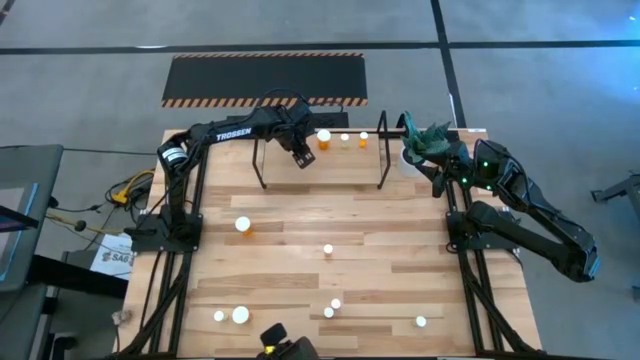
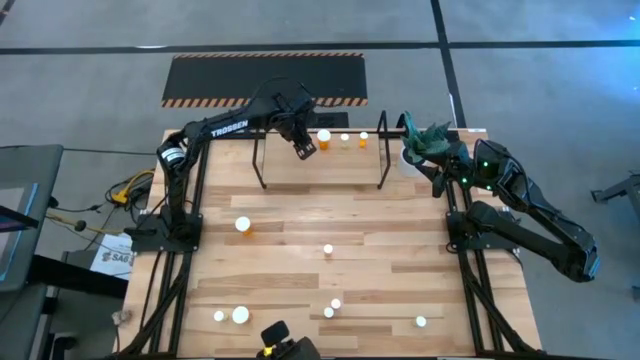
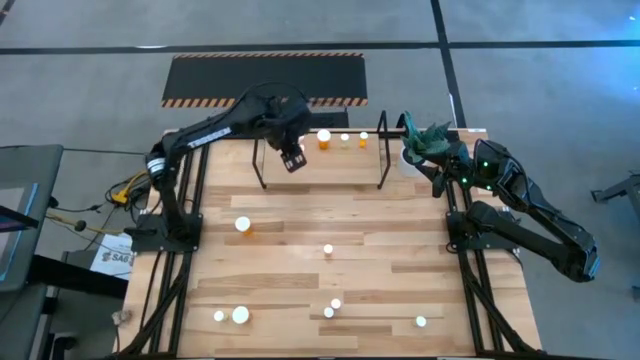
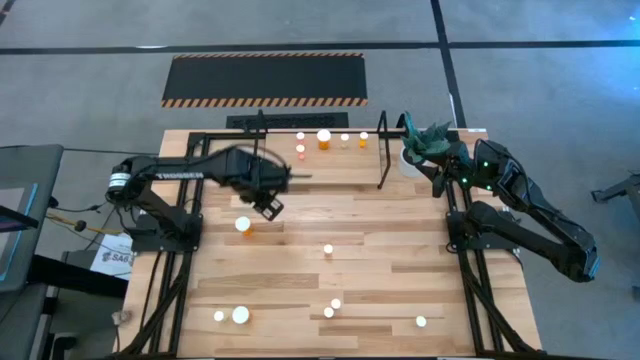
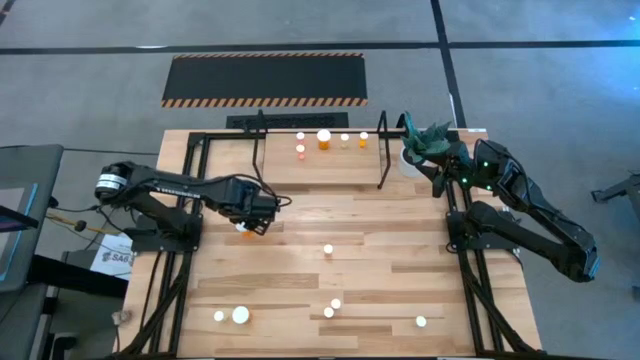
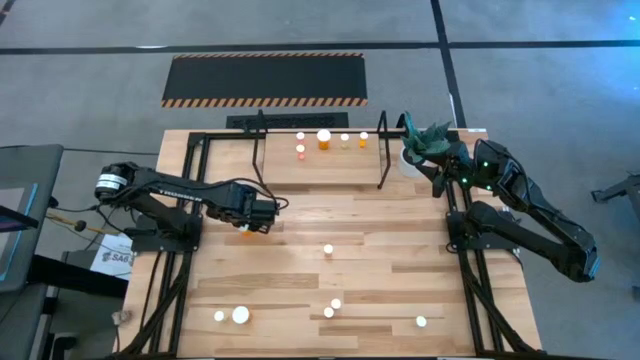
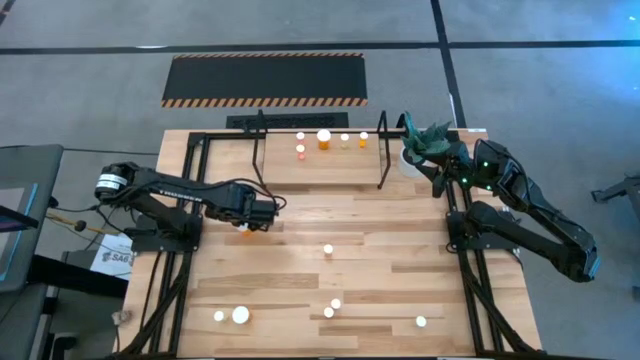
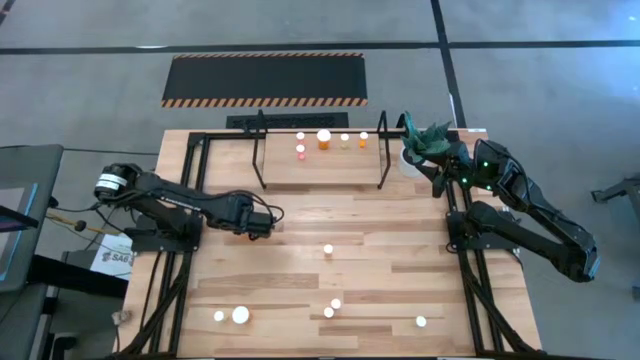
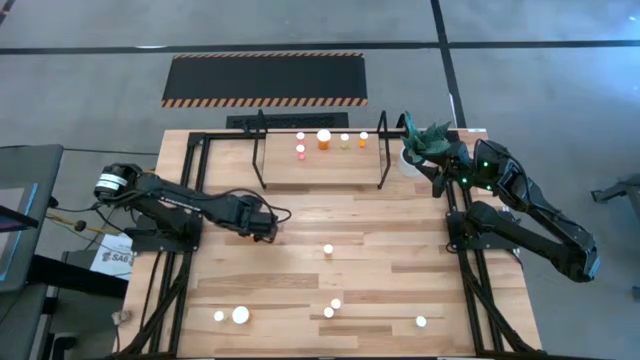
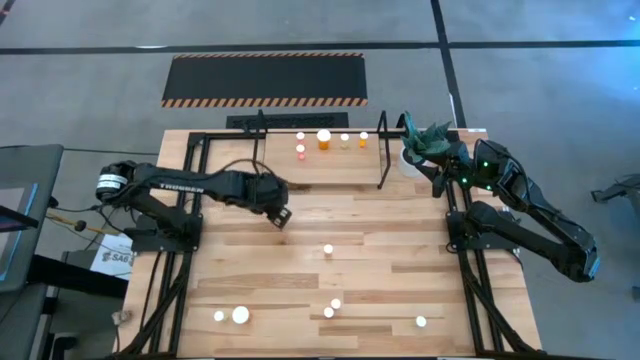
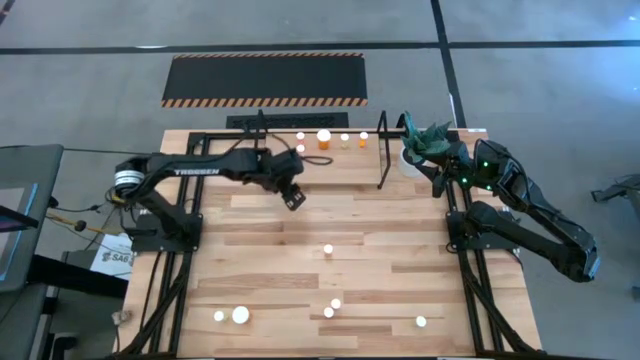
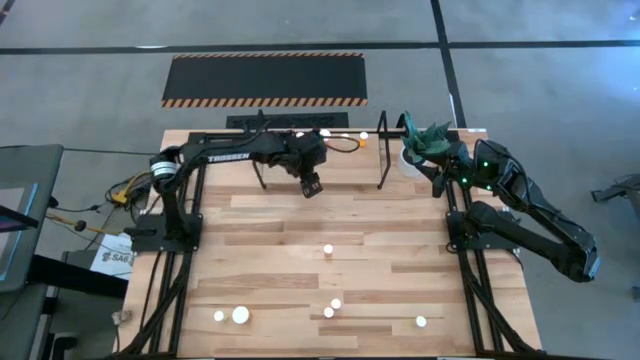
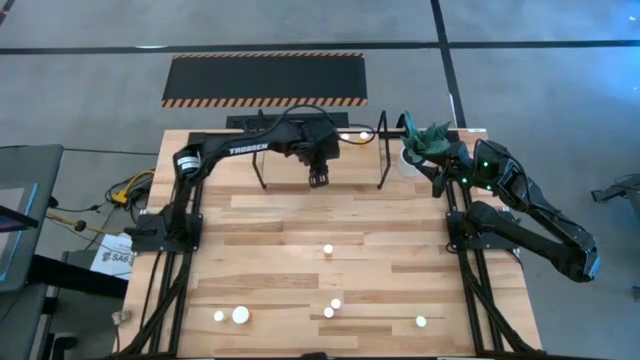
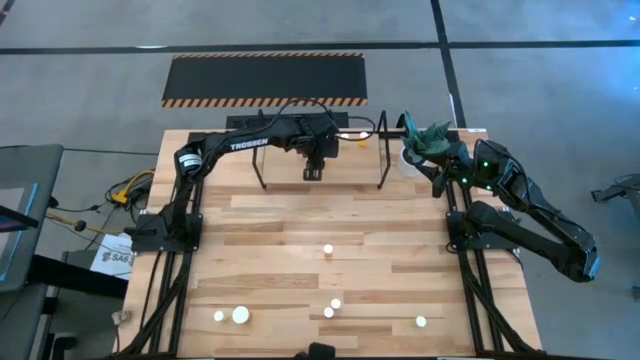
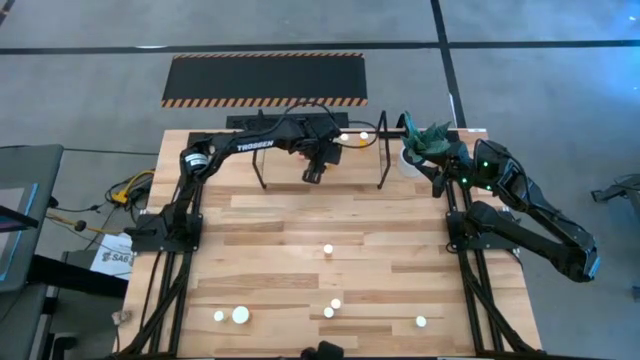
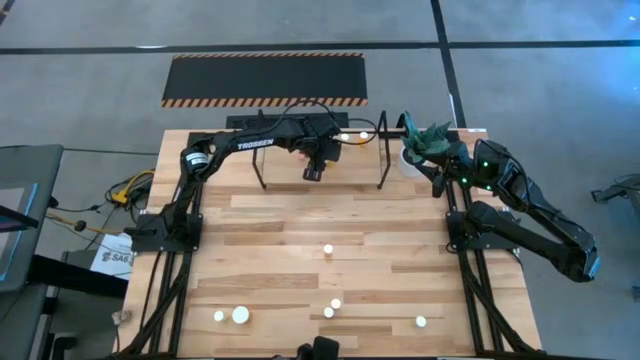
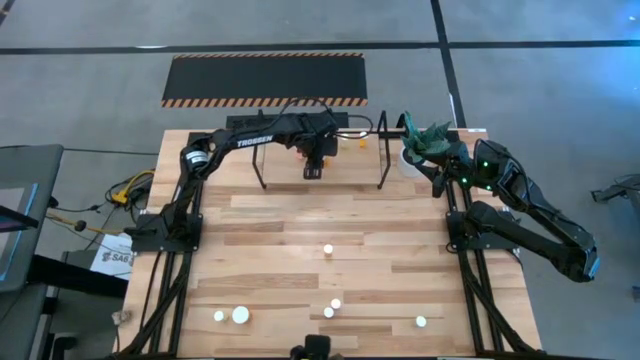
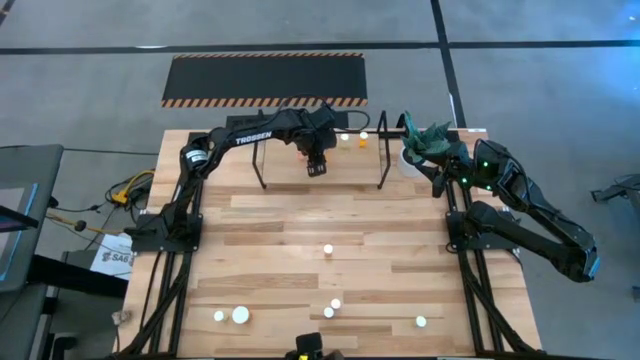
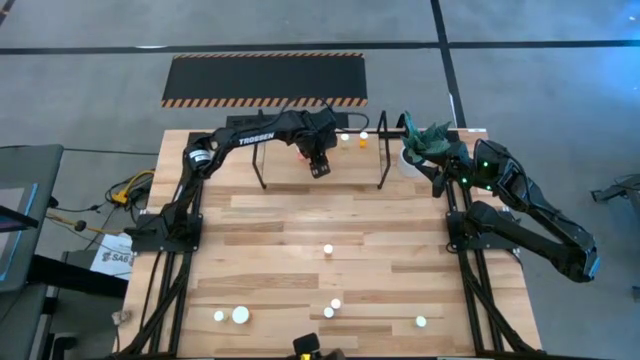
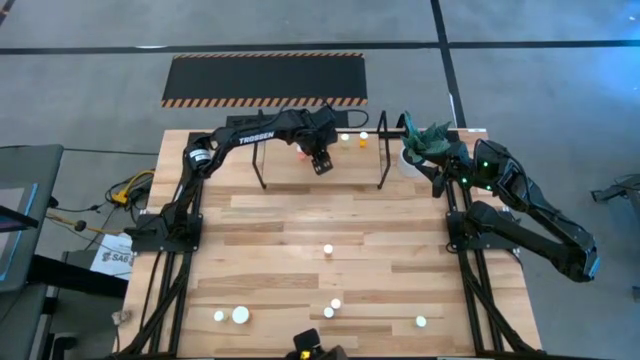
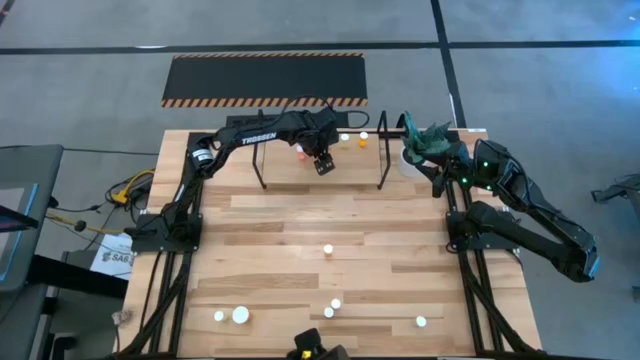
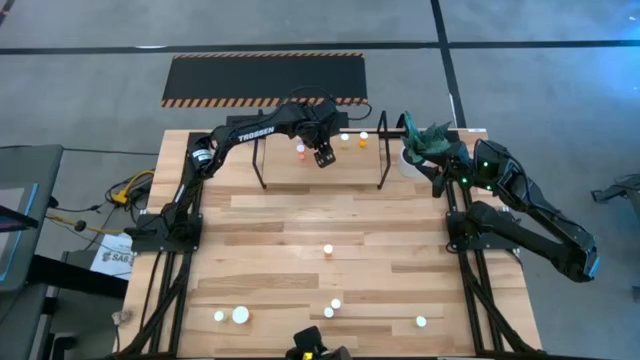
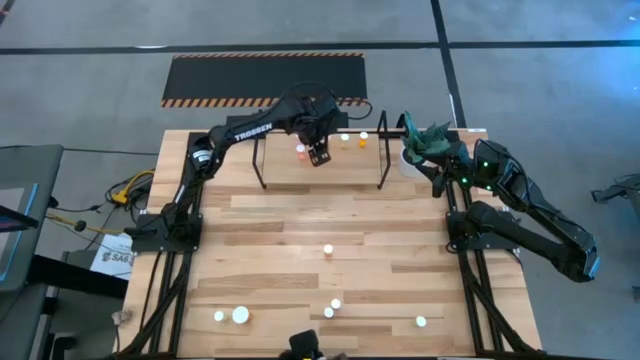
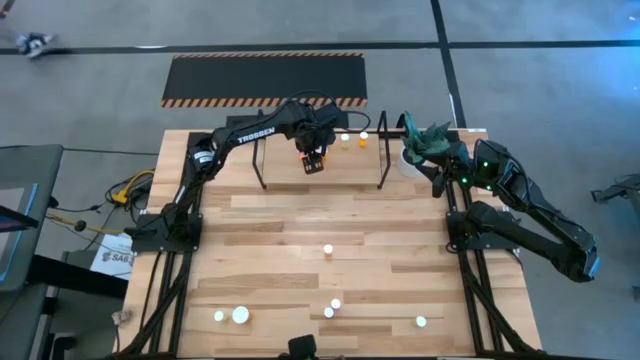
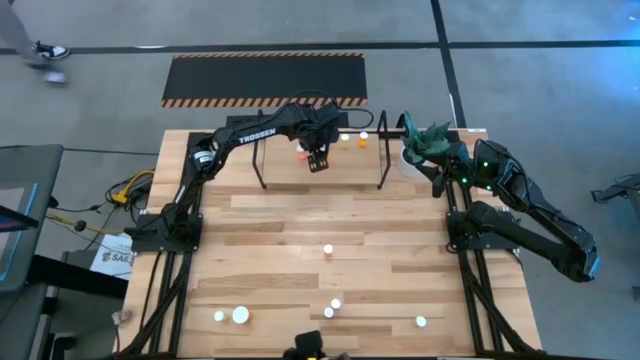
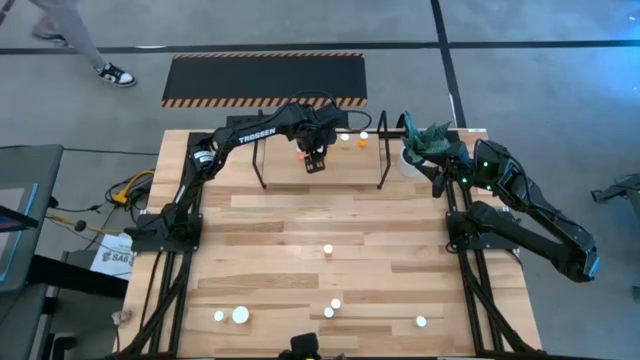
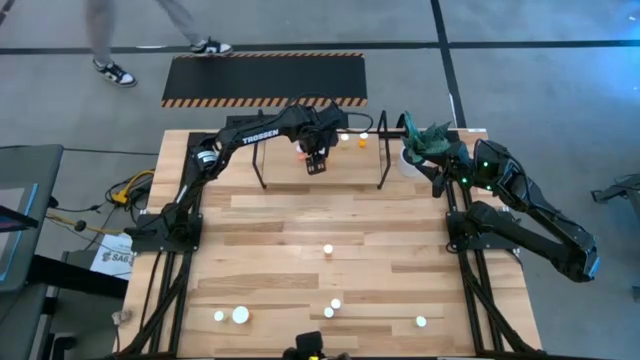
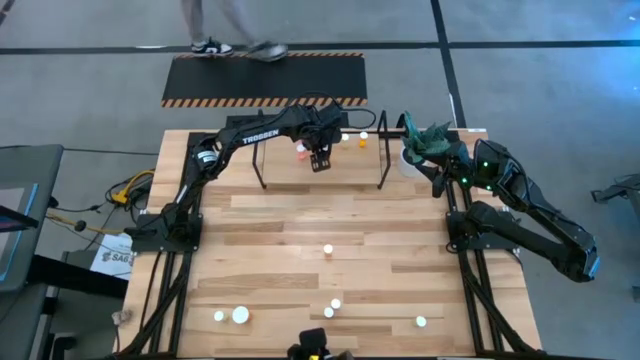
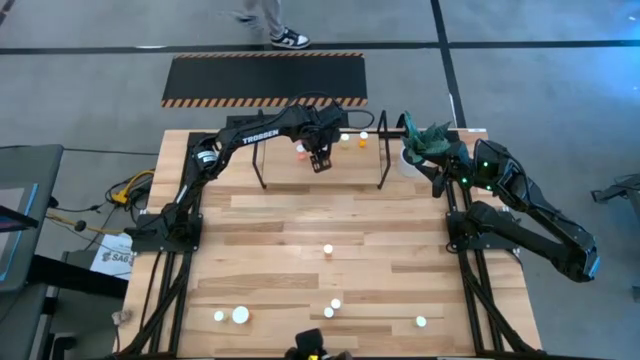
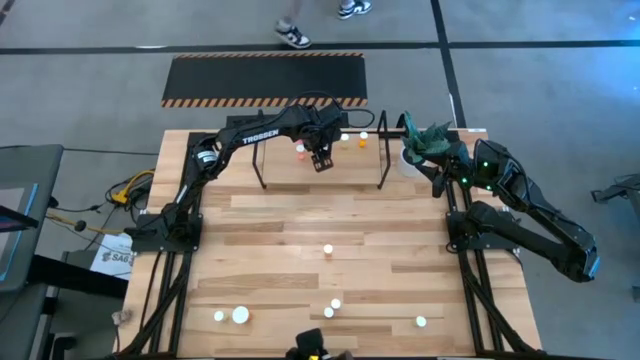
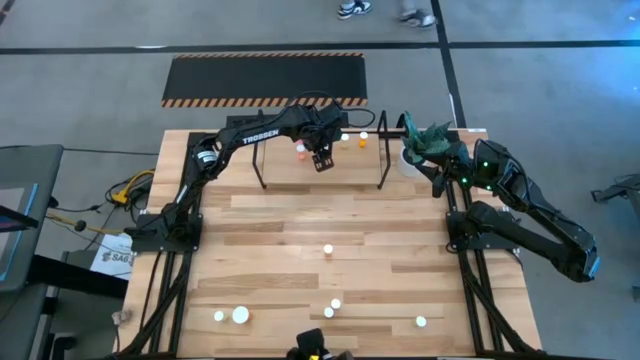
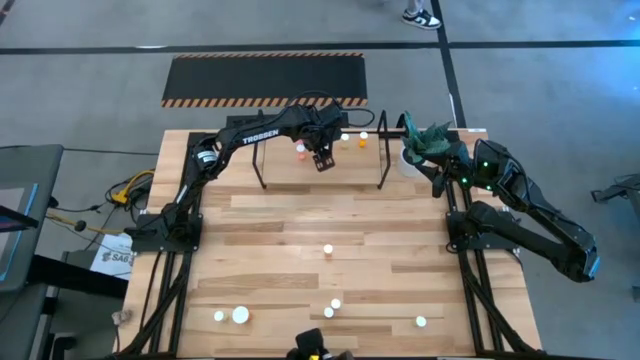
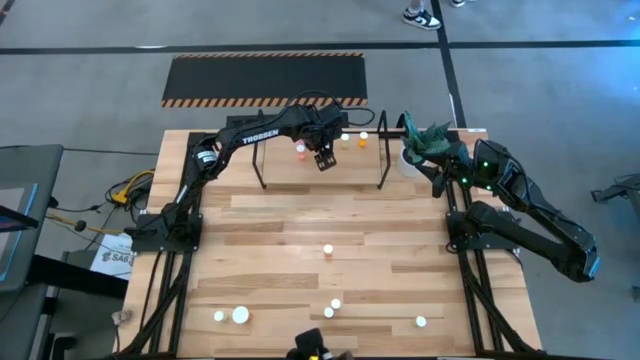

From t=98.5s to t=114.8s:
Task: Pick and place medicine bottles onto shelf by color
Put the top large orange pill bottle on the shelf aligned with the other large orange pill bottle

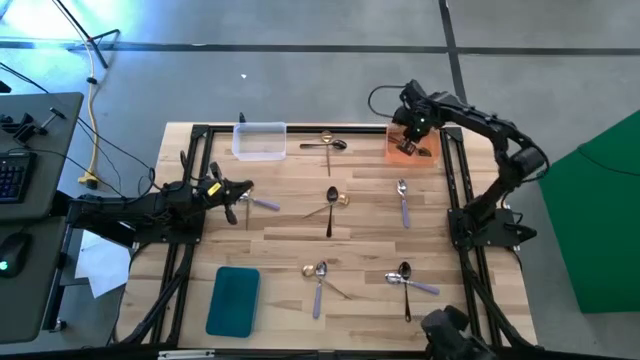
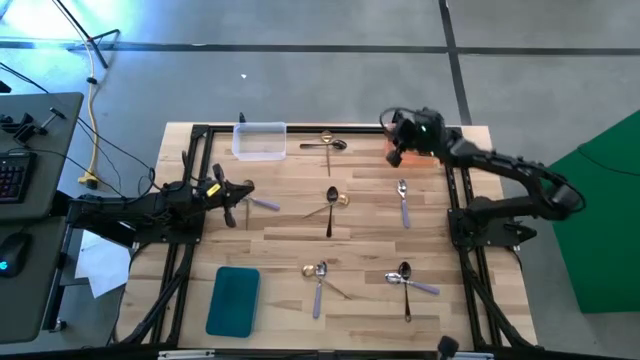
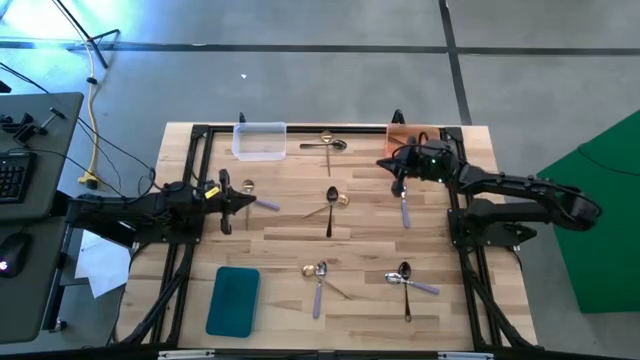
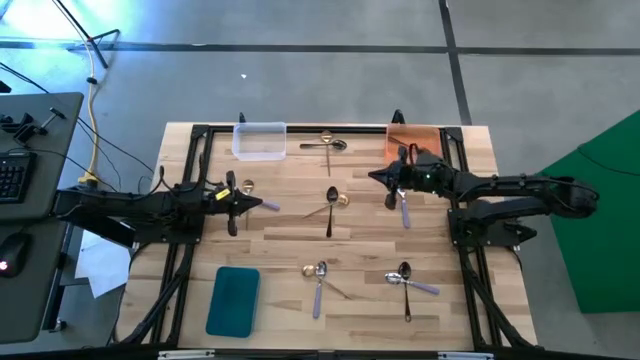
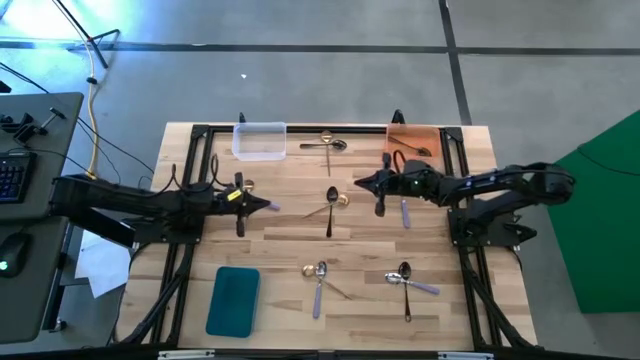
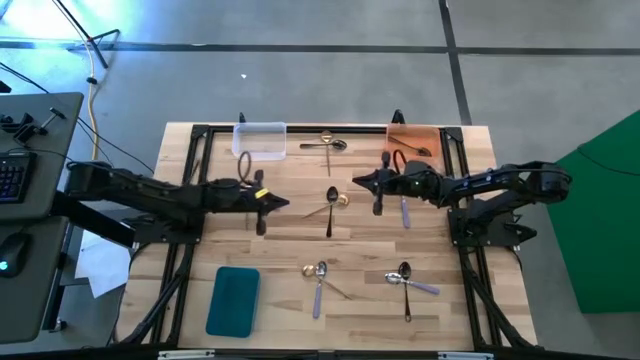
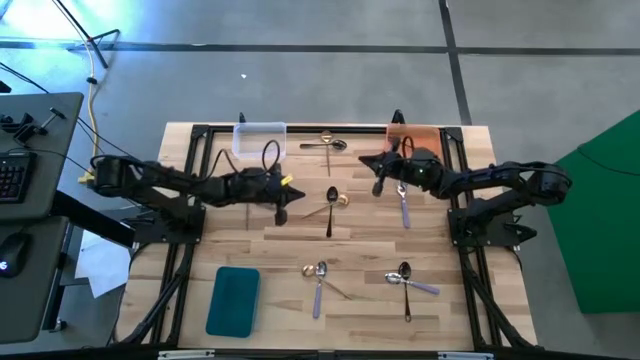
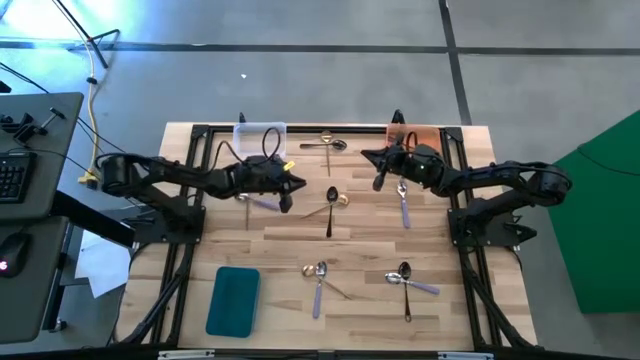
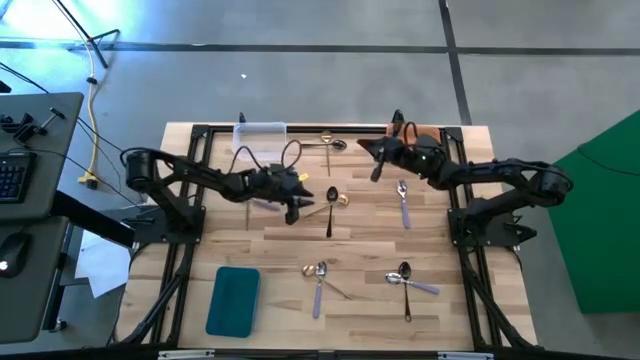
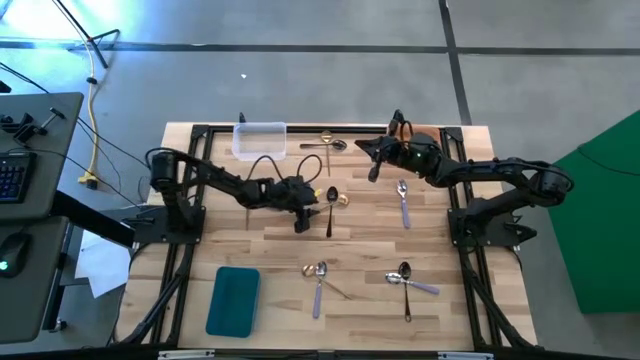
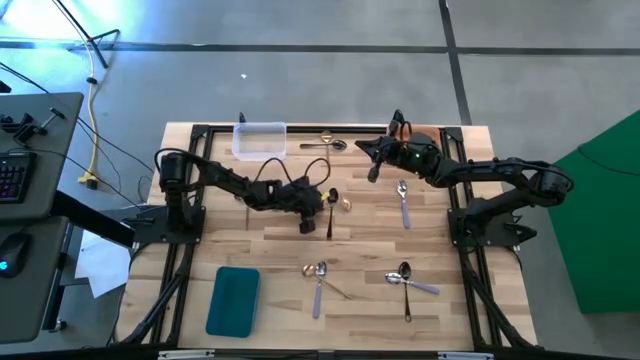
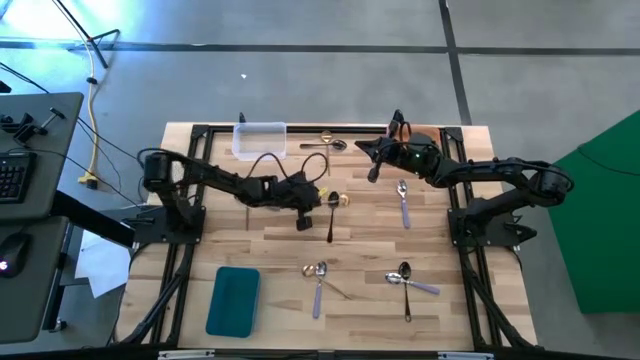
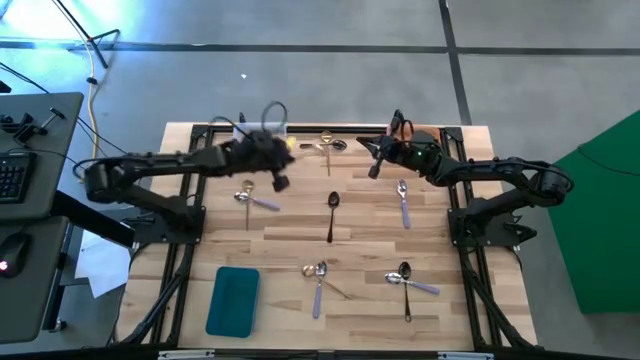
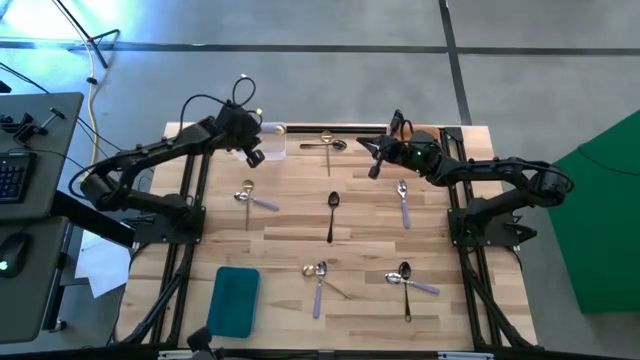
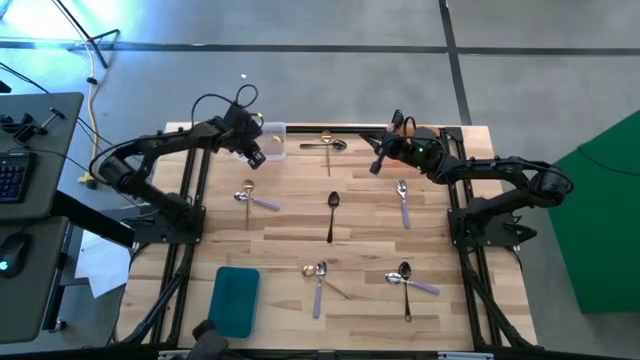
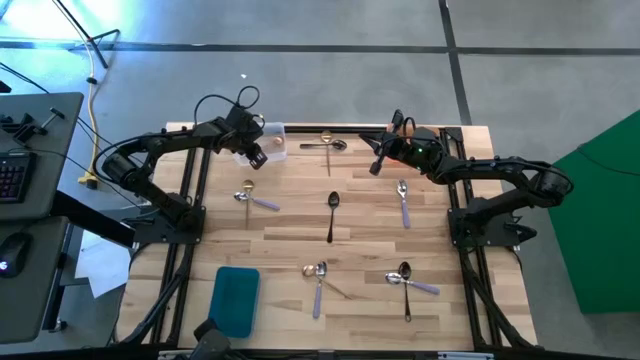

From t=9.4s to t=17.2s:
Task: Sort silverware by color (type)
Put the middle gold spoon into the transparent bin
